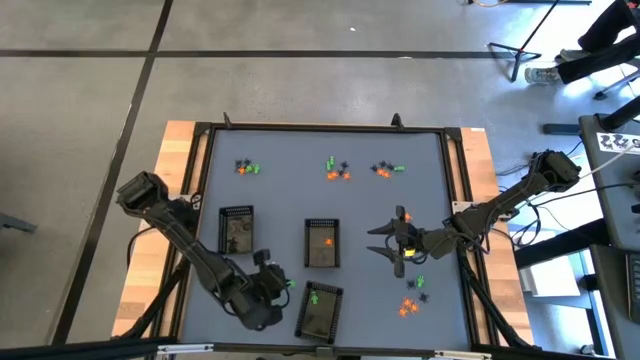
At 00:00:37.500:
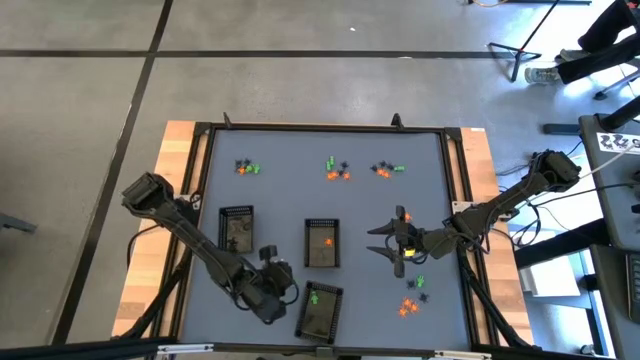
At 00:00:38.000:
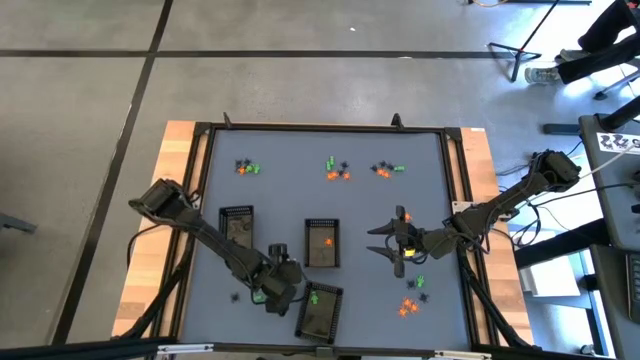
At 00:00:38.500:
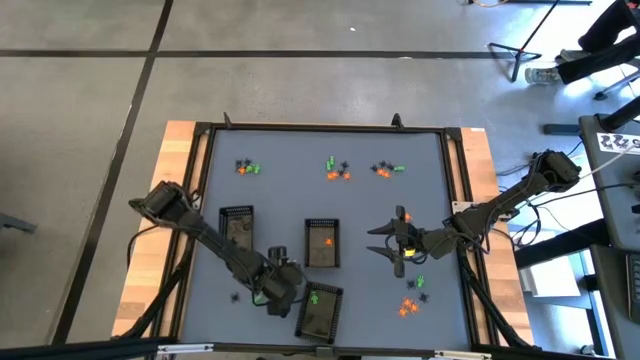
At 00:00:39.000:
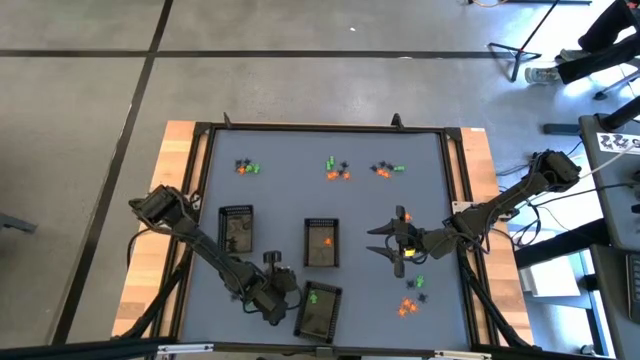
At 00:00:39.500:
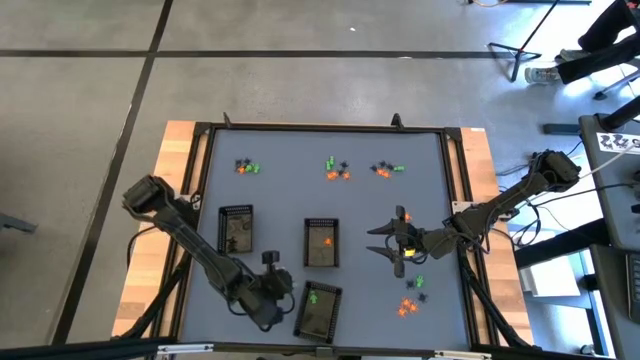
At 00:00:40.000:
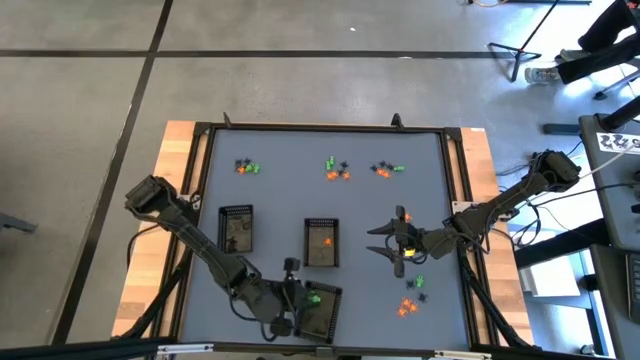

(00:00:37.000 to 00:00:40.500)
Task: Sort Halloween decoration
Put the green toy skeleton into the bottom black basket

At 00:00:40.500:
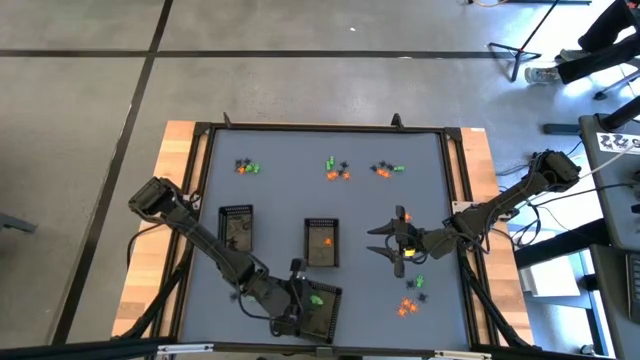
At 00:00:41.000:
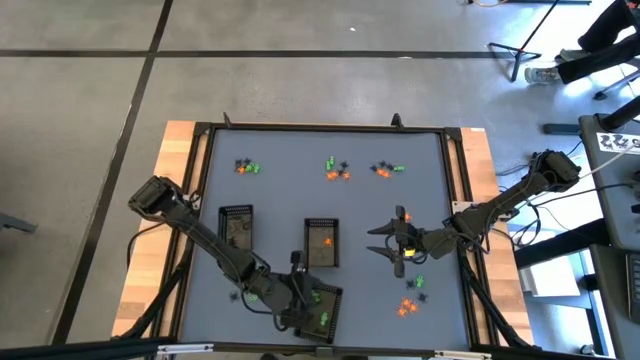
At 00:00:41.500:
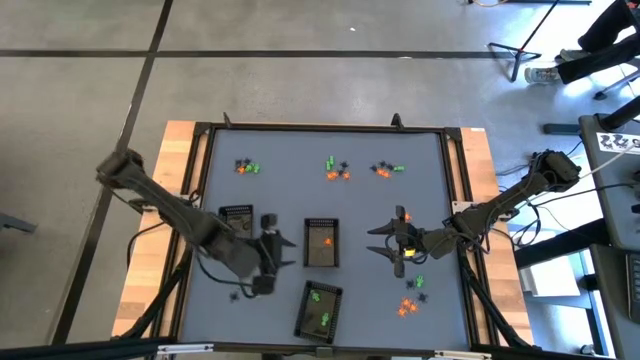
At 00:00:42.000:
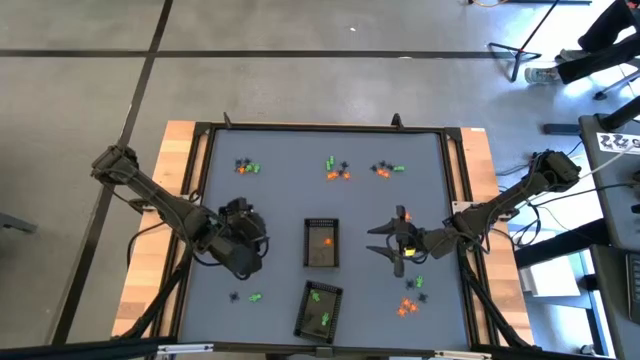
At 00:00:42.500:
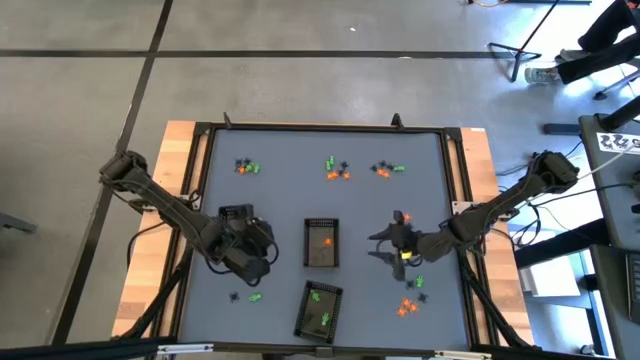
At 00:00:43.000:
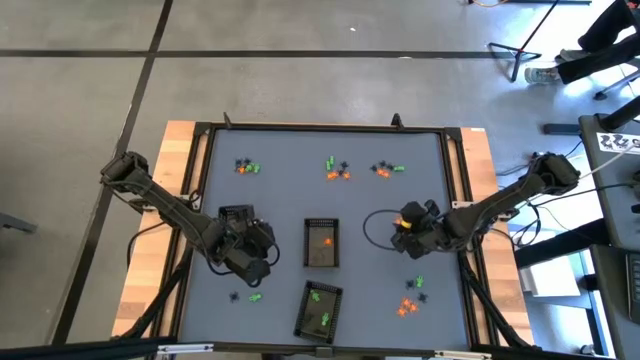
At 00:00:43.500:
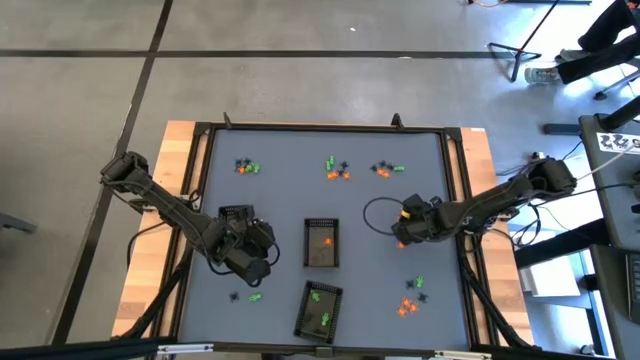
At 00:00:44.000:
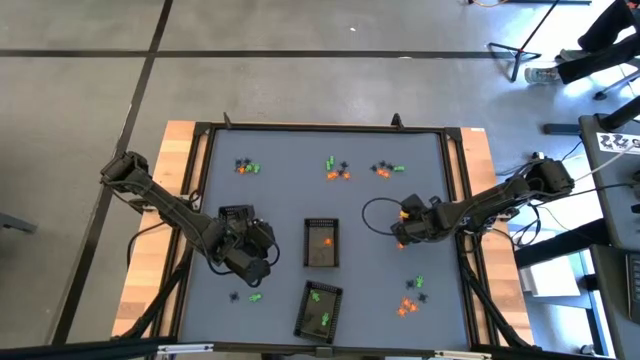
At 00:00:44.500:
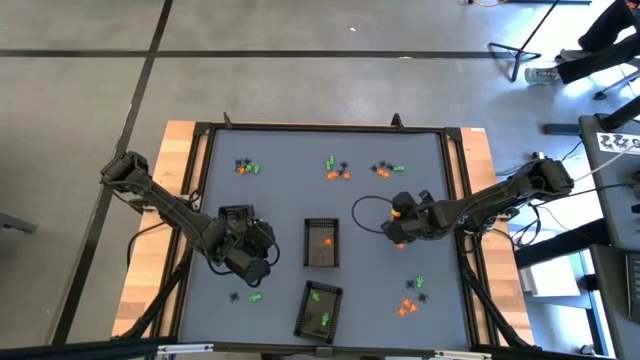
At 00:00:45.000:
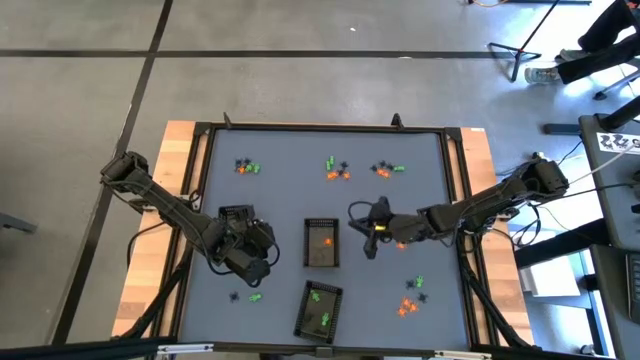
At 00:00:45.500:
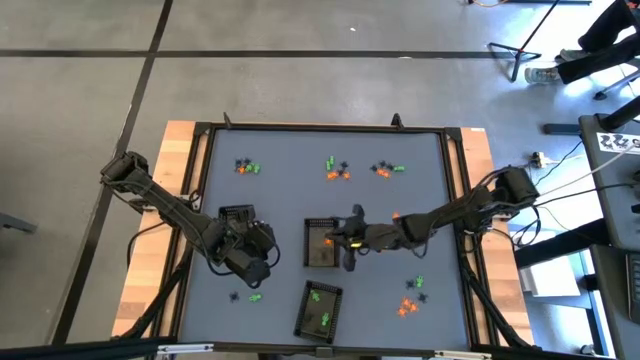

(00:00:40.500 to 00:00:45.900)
Put the orange spider toy into the top right black basket

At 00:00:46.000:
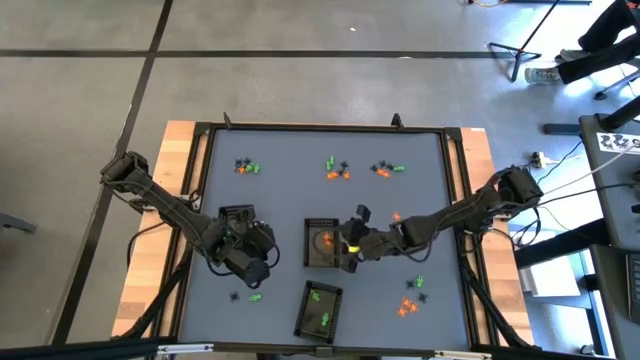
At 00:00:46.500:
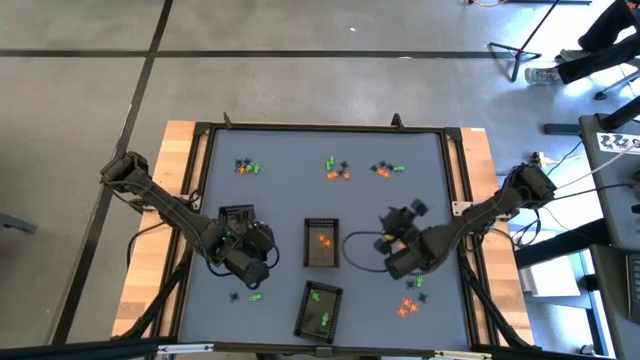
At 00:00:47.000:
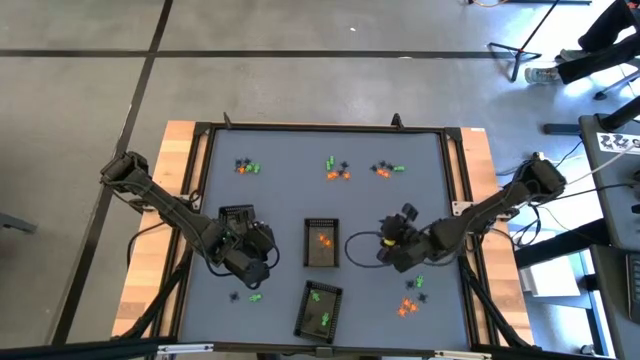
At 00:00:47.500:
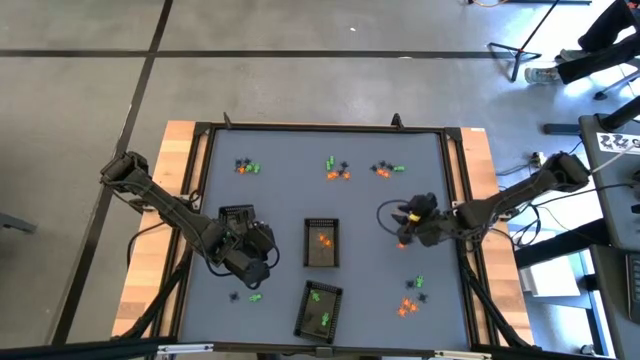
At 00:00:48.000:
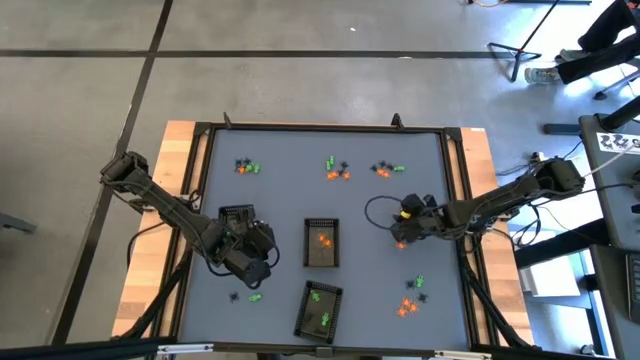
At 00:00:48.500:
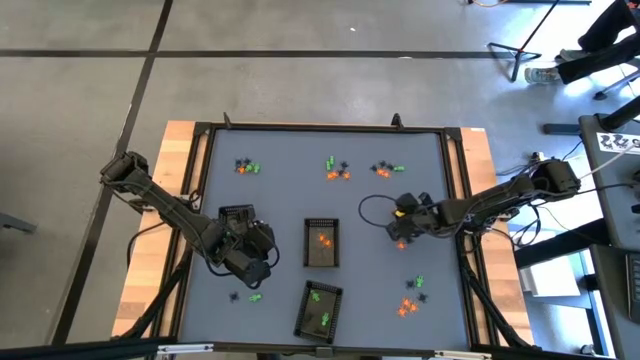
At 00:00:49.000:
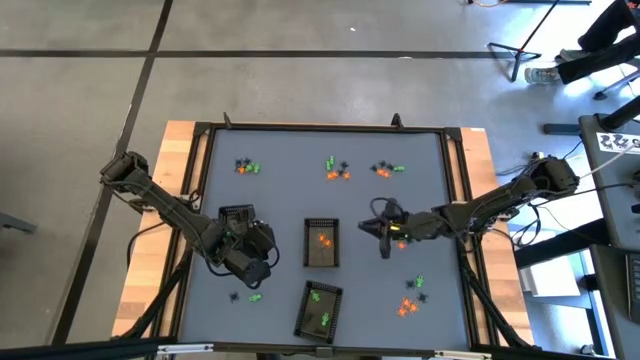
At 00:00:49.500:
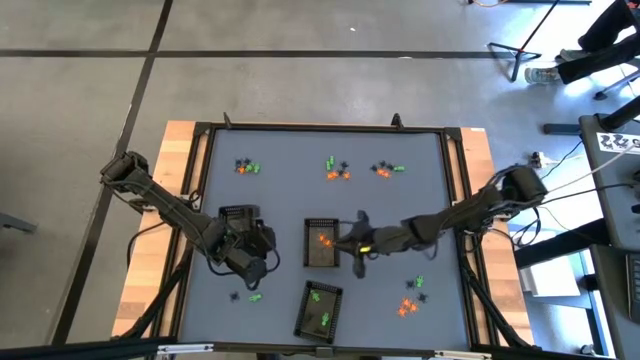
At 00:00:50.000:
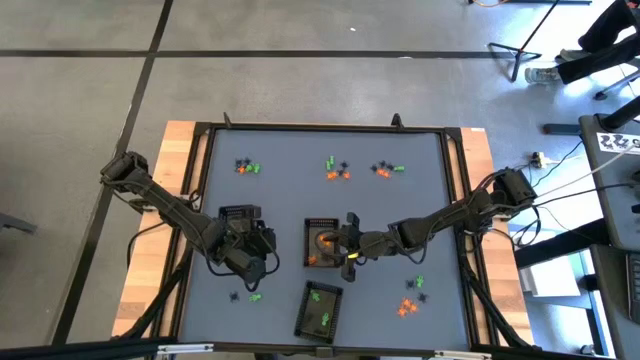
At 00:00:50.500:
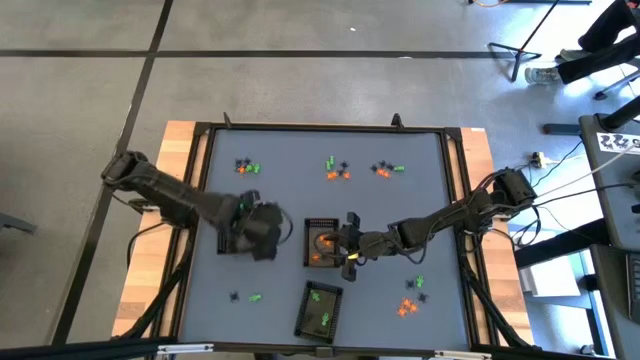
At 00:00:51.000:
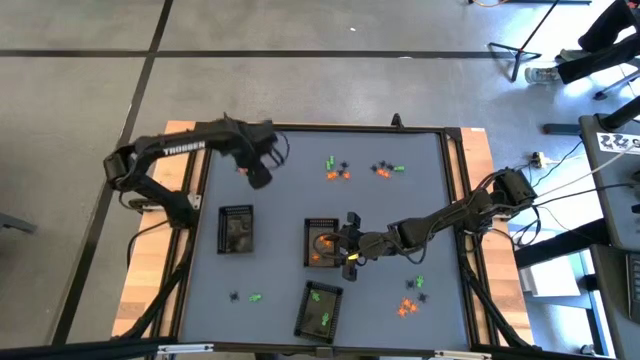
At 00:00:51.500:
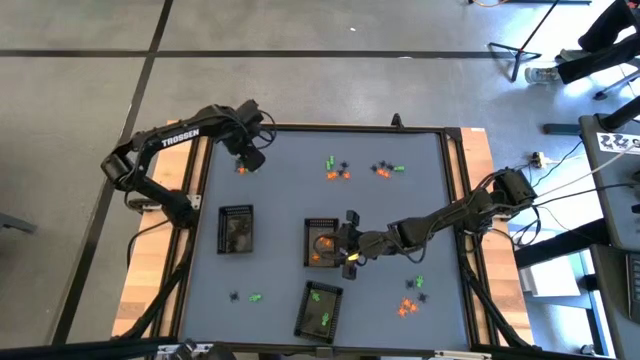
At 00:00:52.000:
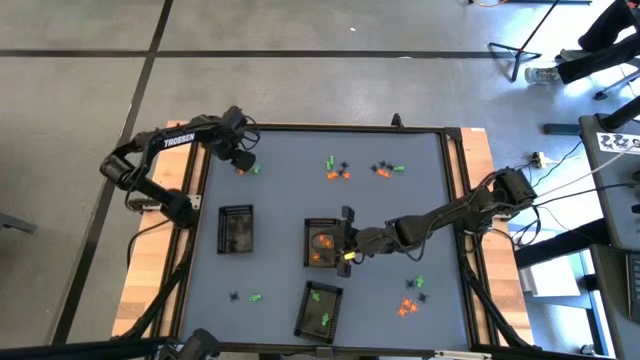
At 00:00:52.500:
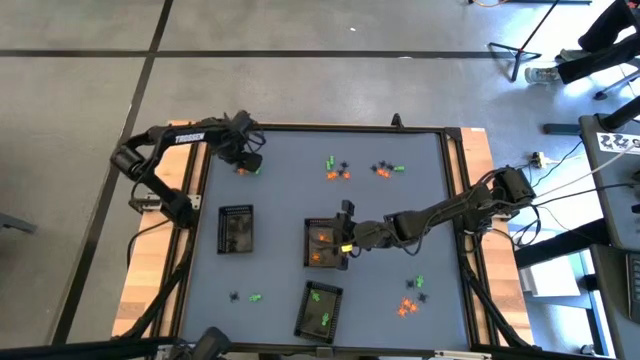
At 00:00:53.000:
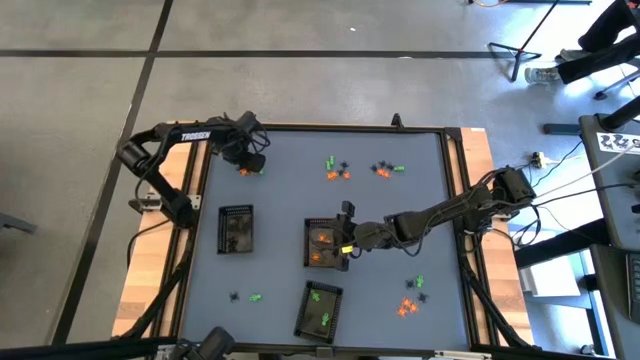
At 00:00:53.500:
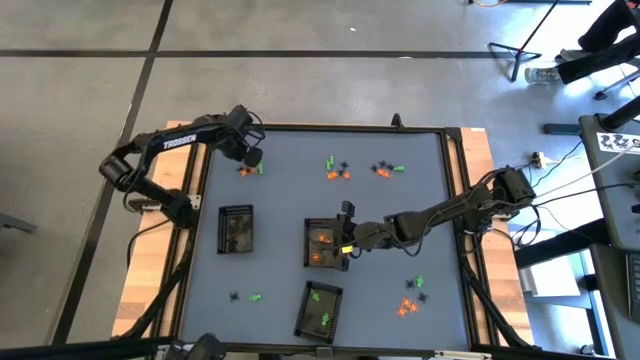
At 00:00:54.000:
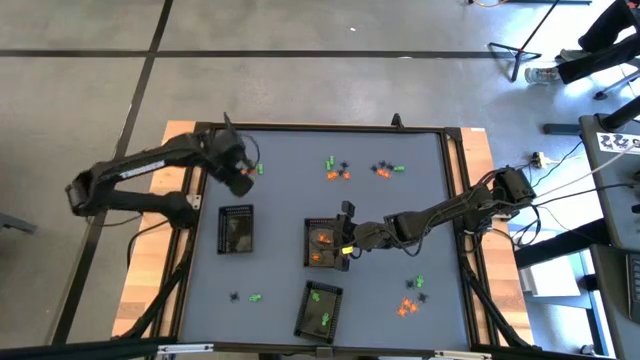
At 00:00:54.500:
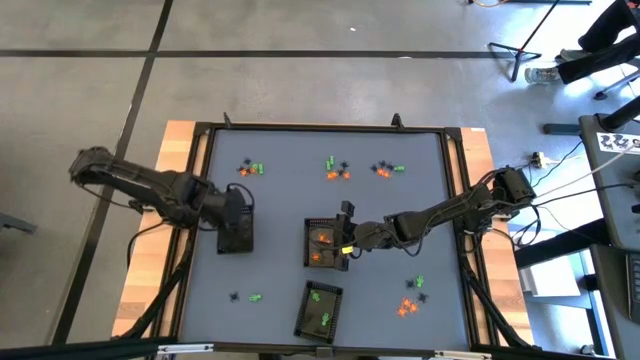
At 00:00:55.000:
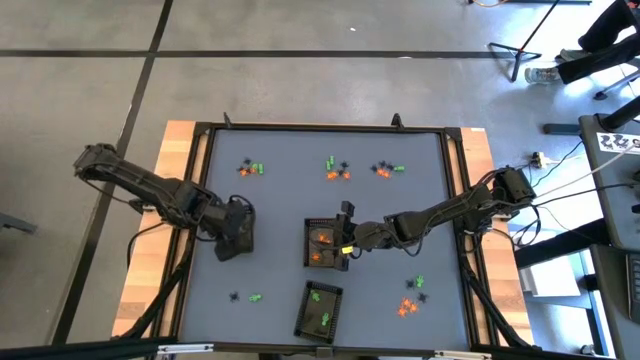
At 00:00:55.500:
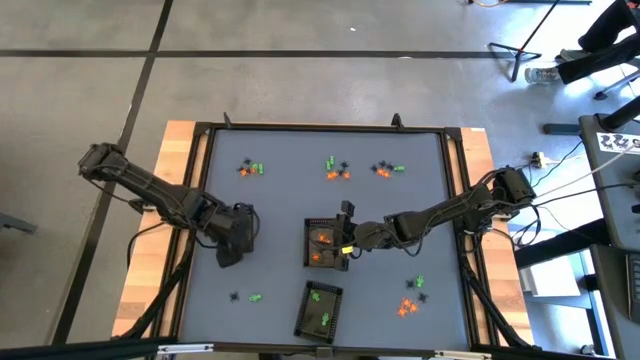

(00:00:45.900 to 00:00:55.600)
Put the orange spider toy into the top right black basket

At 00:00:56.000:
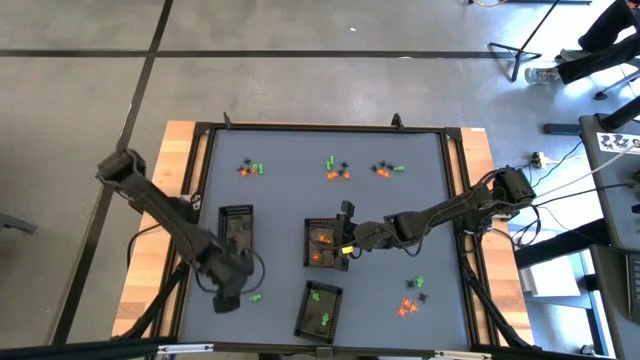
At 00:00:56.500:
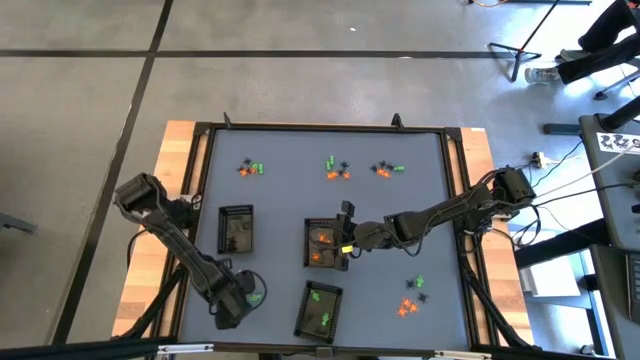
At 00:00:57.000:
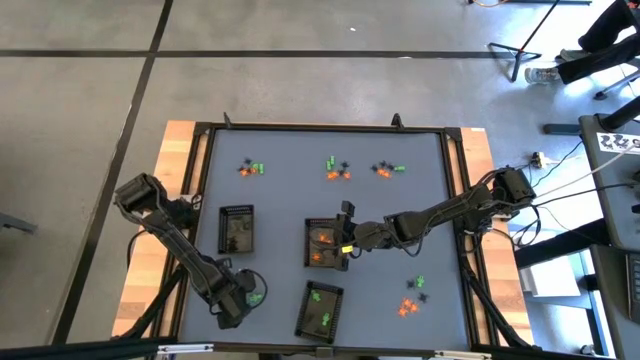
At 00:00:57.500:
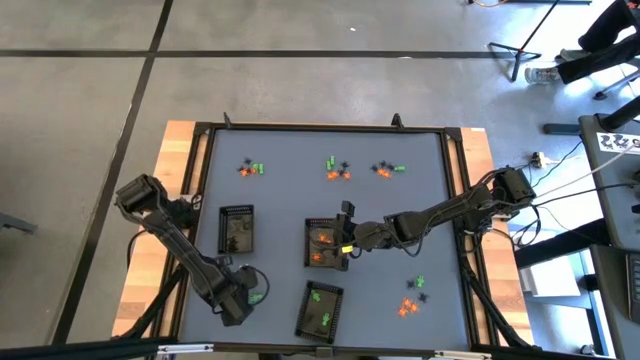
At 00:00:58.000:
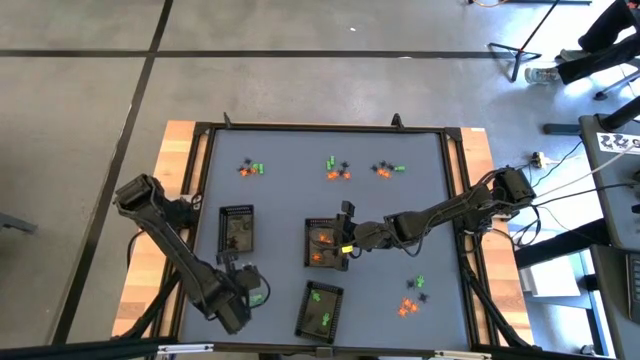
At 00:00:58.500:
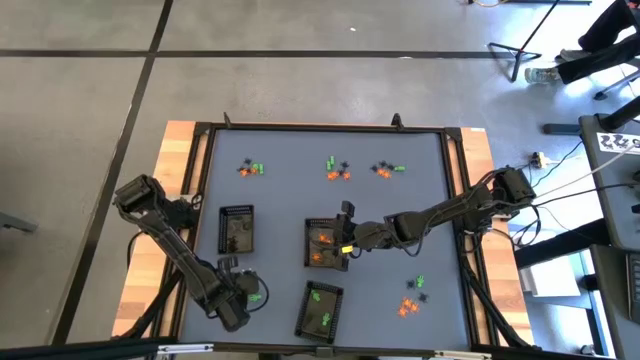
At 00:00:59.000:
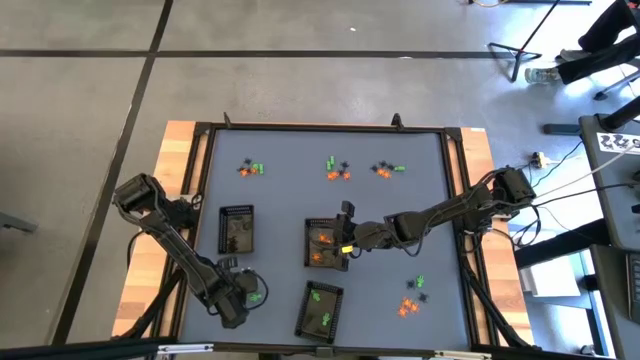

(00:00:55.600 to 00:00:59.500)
Put the black spider toy into the top left black basket
